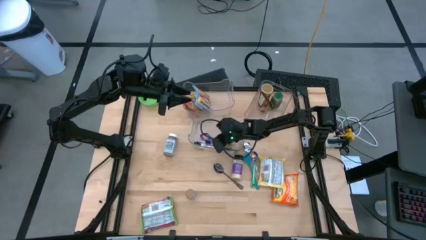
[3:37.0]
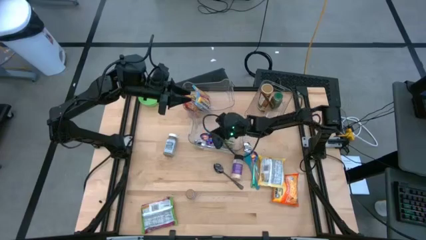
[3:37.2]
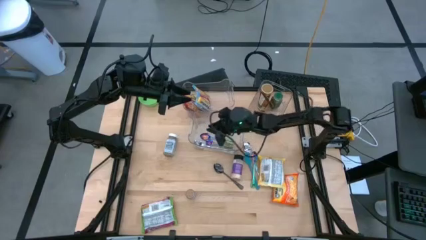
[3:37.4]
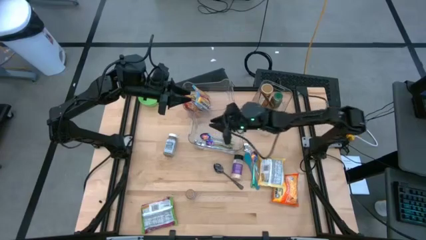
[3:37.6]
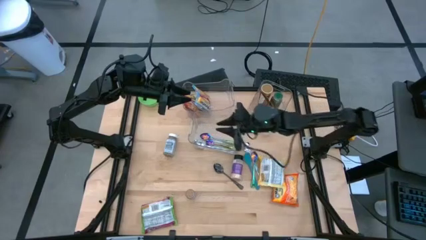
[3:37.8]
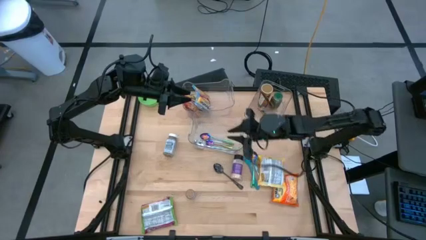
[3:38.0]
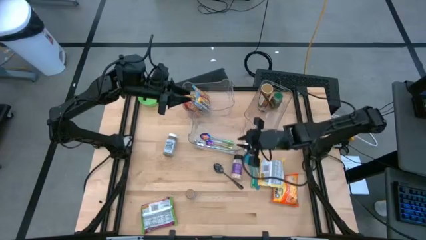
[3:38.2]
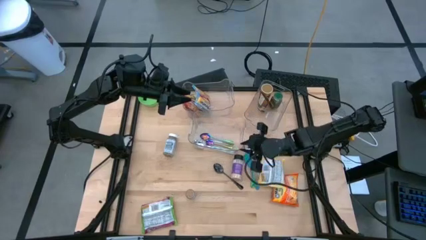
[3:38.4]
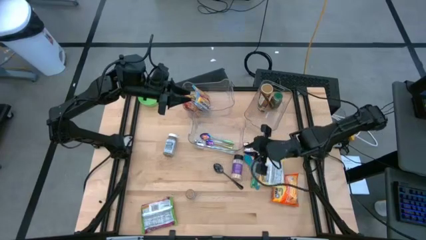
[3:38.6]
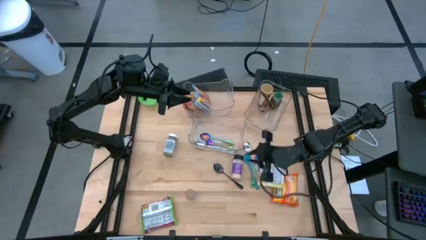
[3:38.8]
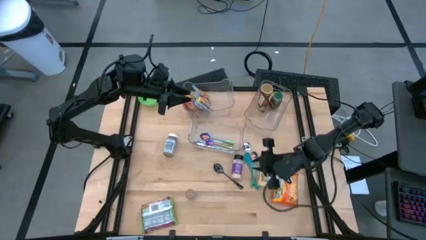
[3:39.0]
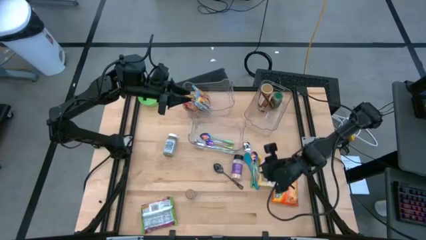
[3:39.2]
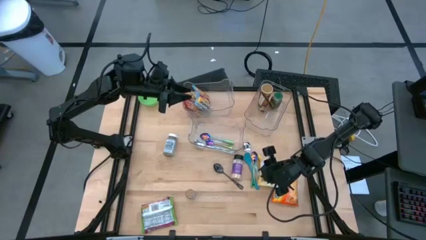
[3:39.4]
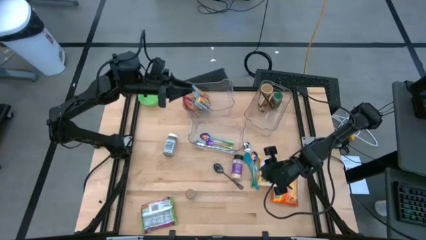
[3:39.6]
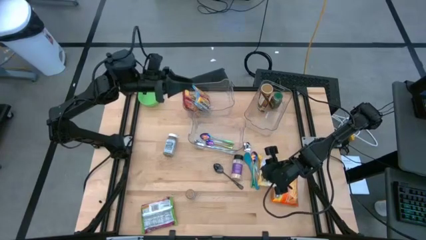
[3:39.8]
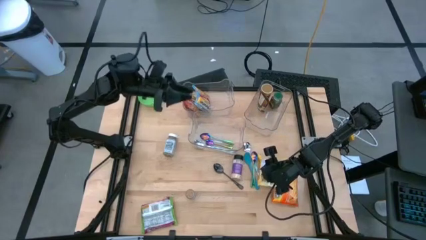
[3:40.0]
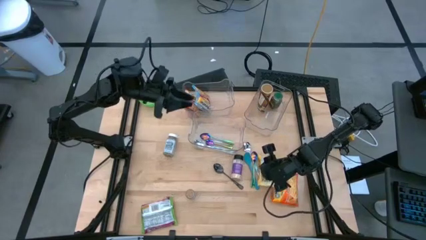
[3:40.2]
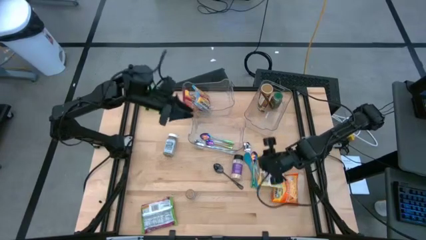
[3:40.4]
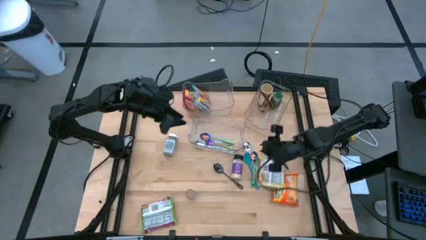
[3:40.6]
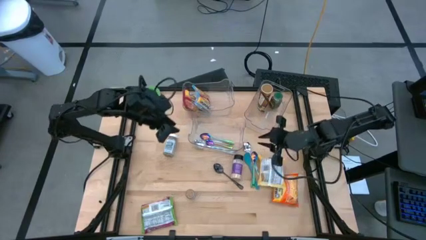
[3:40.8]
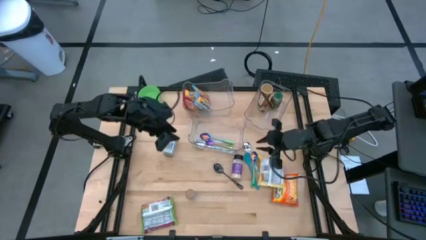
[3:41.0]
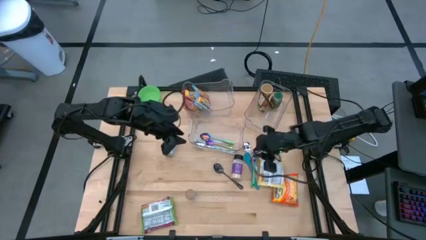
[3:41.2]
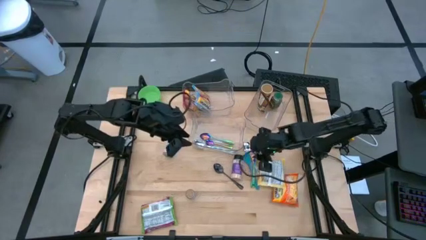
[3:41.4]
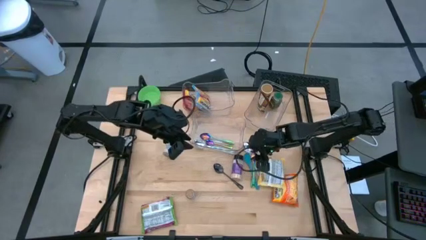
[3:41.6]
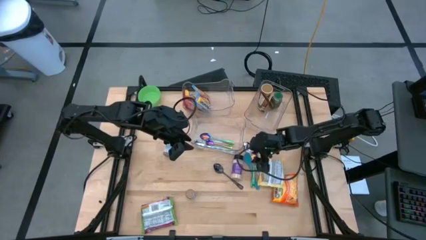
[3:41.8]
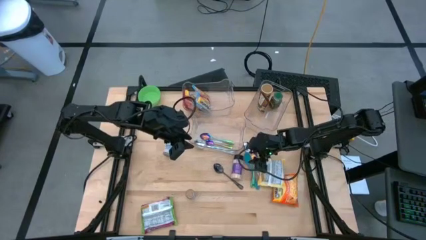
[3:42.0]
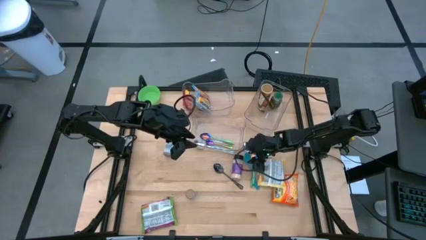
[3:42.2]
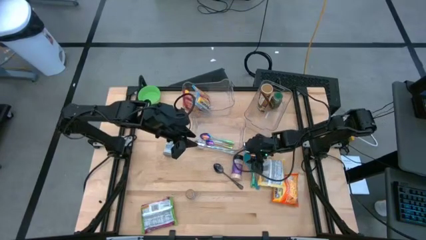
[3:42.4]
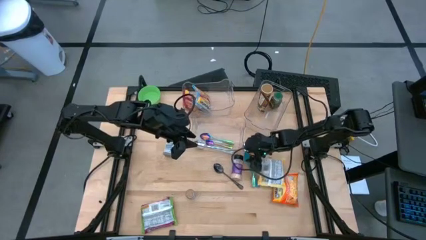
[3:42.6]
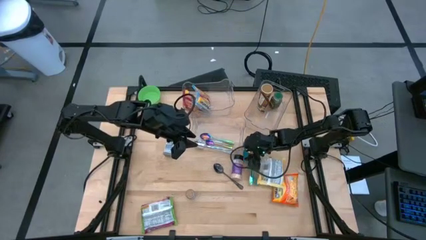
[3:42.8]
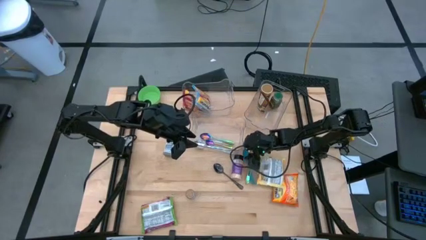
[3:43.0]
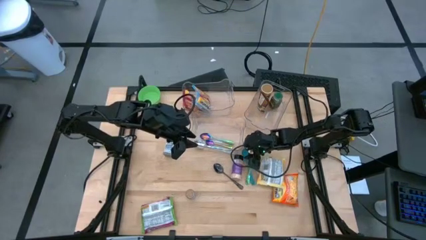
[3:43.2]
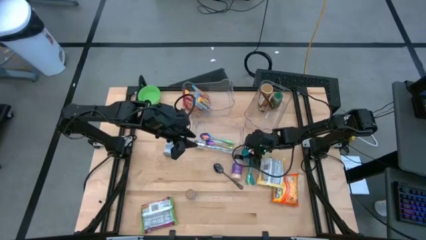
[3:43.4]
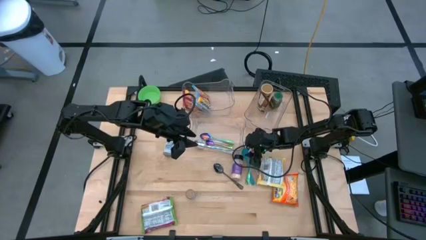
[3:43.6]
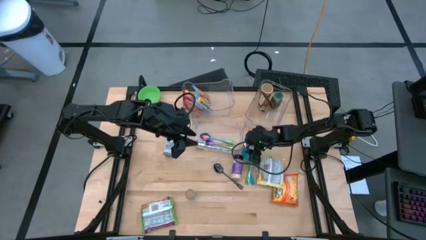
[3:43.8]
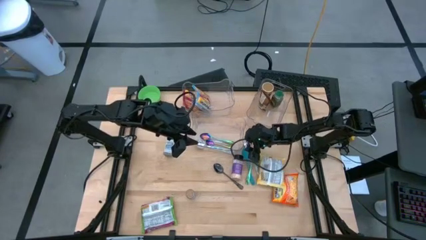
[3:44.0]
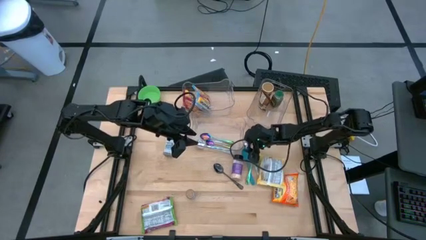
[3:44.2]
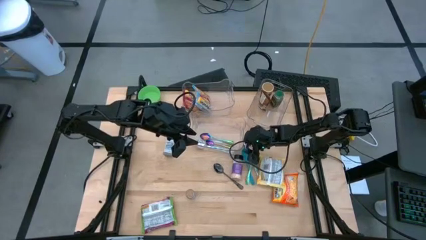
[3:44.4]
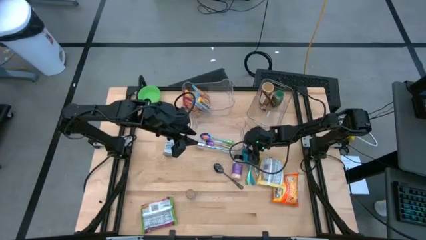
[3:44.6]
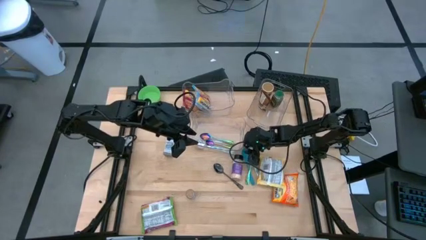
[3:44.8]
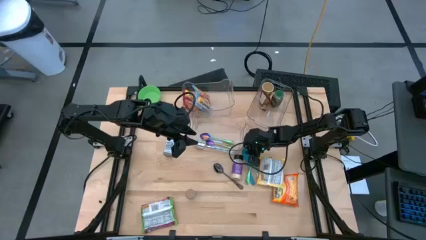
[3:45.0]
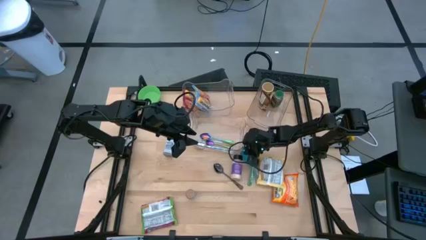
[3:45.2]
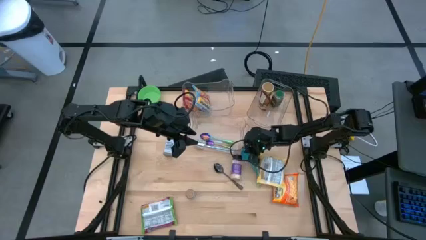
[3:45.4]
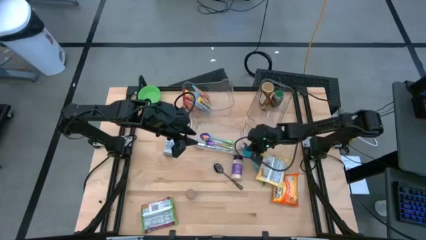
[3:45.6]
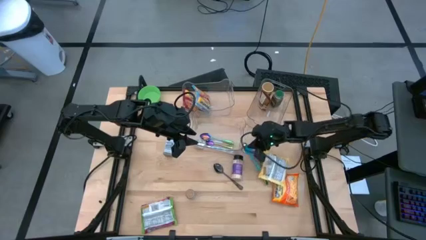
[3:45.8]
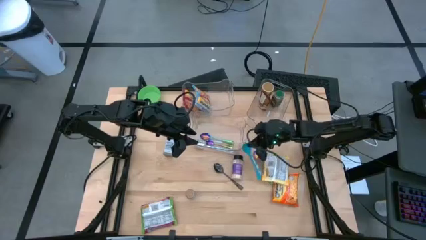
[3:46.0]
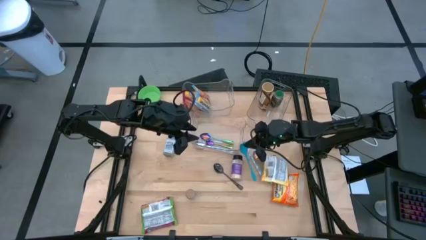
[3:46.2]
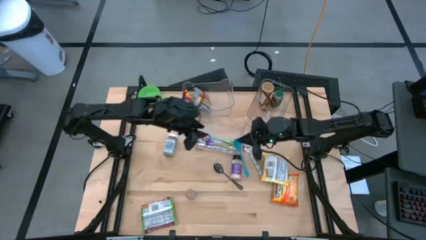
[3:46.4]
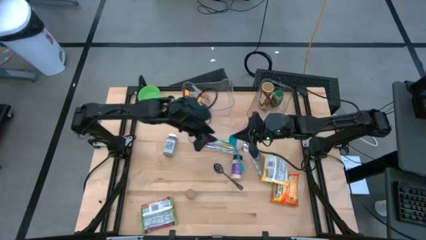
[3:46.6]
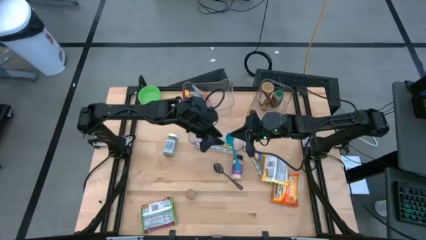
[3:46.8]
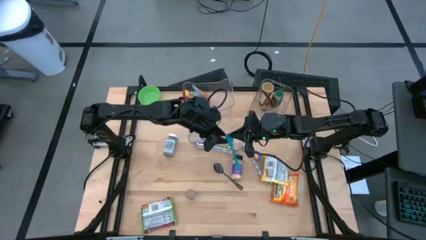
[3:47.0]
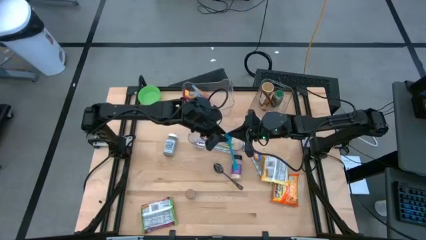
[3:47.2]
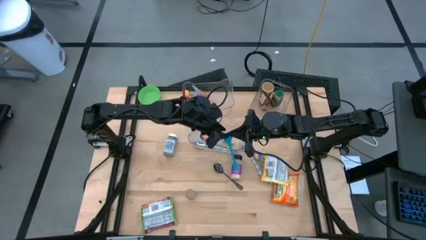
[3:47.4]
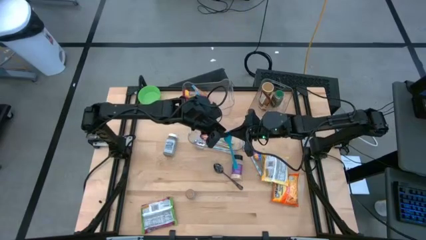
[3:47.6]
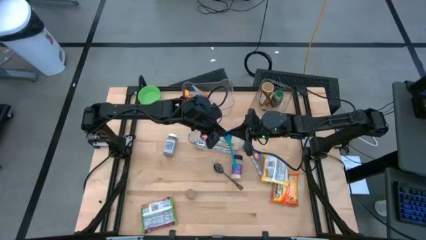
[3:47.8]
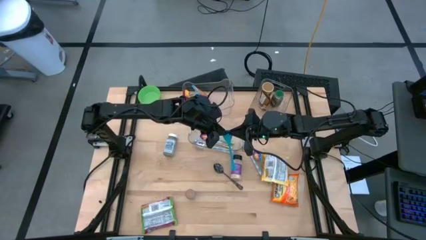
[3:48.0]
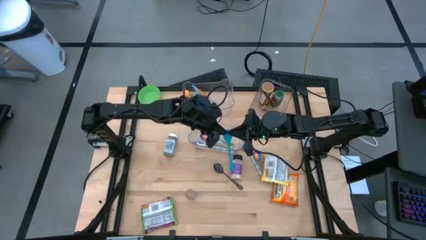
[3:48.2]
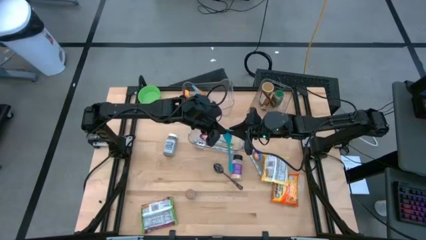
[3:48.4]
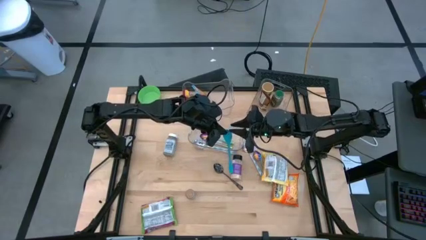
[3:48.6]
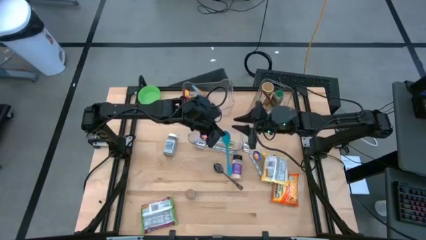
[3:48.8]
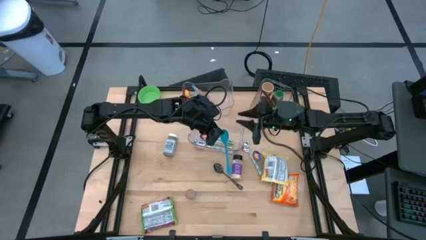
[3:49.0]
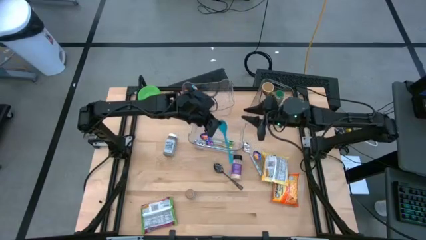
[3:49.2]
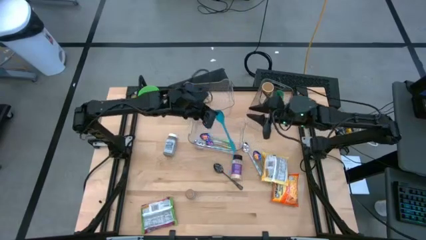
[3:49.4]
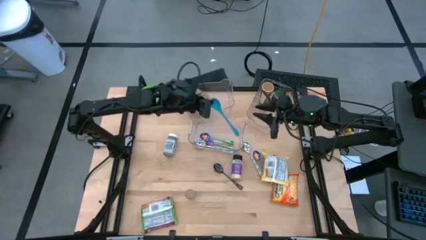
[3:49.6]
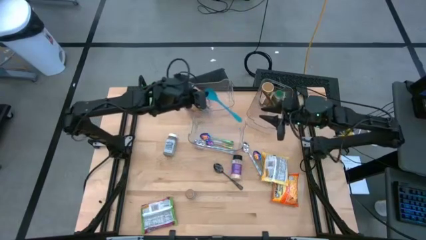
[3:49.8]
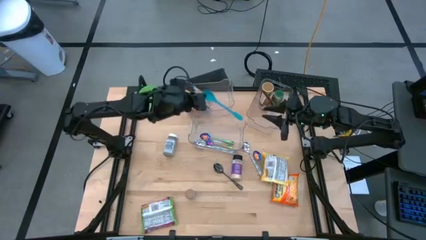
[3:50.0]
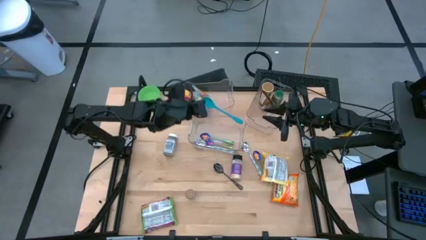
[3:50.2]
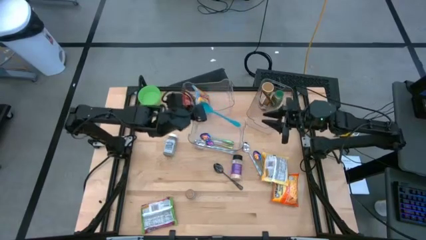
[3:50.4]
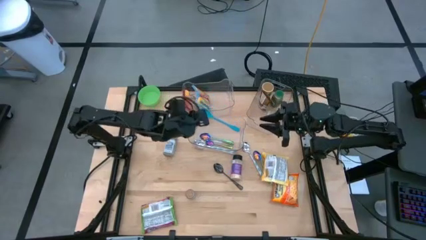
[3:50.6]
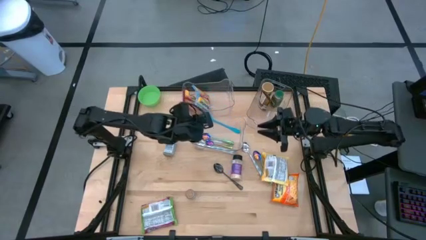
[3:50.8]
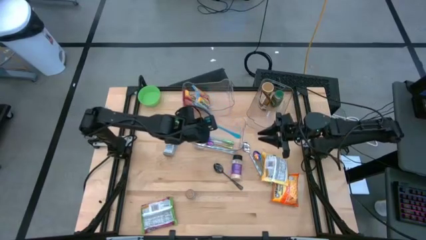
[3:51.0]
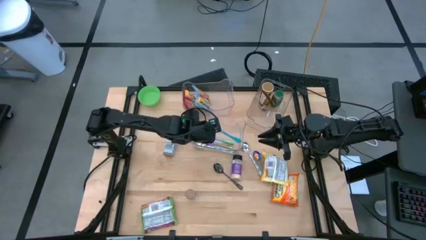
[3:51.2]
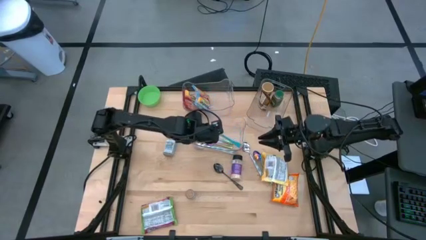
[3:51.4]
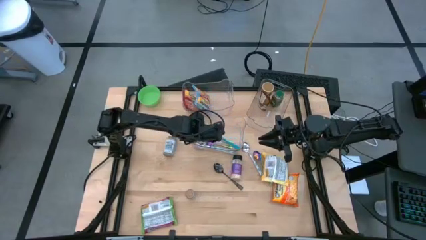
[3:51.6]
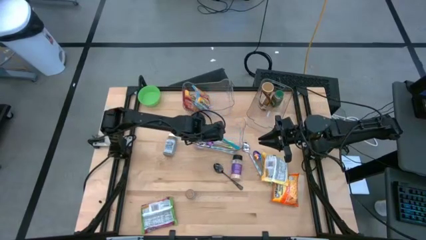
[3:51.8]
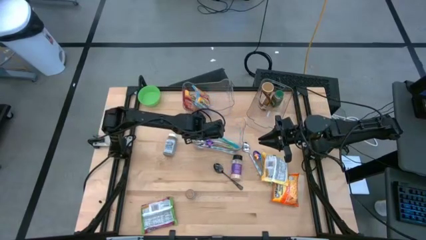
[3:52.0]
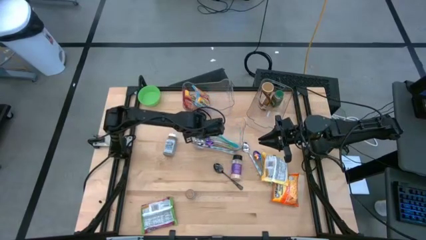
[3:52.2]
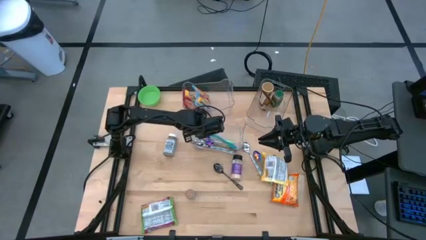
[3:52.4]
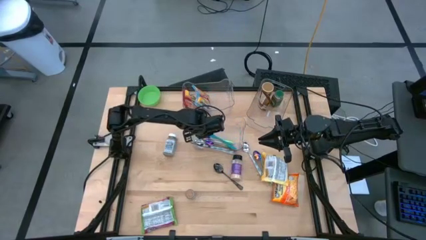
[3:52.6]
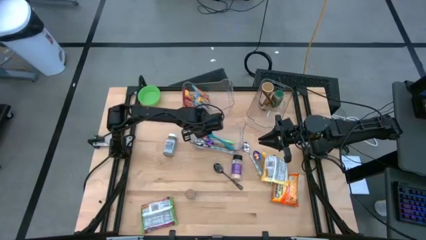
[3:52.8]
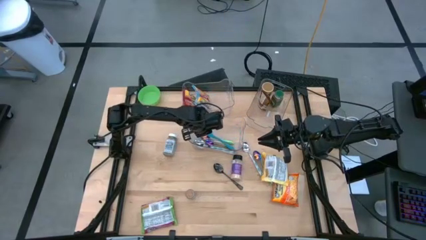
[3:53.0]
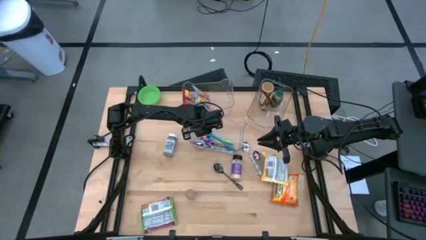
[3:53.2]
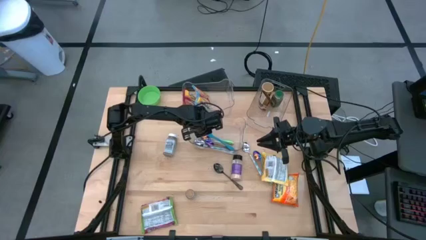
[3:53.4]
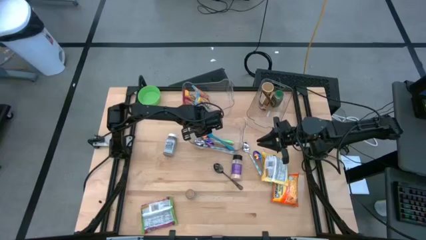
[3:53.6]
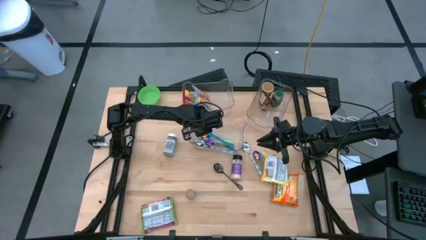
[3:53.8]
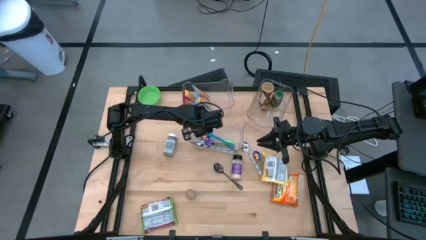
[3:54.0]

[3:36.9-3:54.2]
Task: Pick & Place Food Item
Put the blue spoon into the bottom transparent bin
